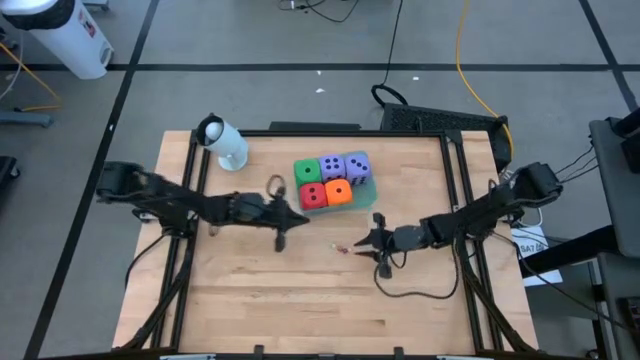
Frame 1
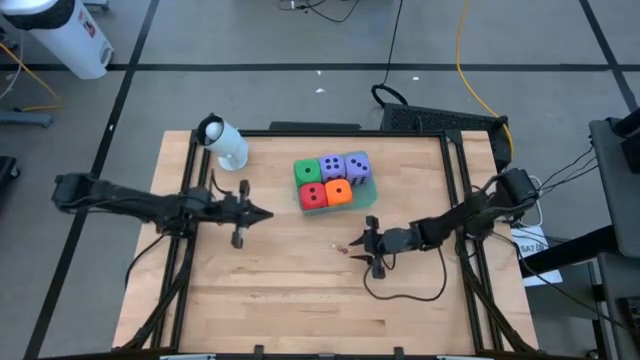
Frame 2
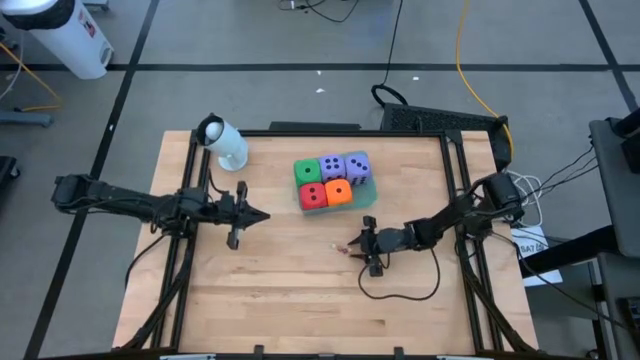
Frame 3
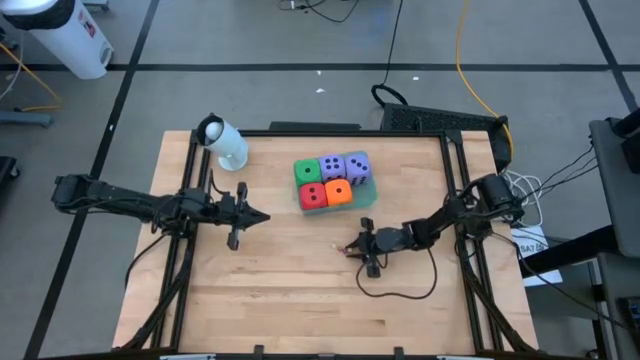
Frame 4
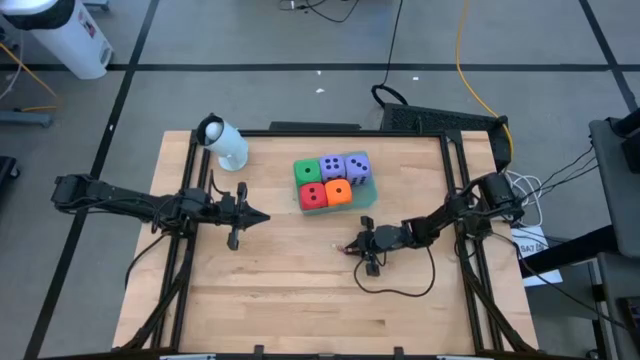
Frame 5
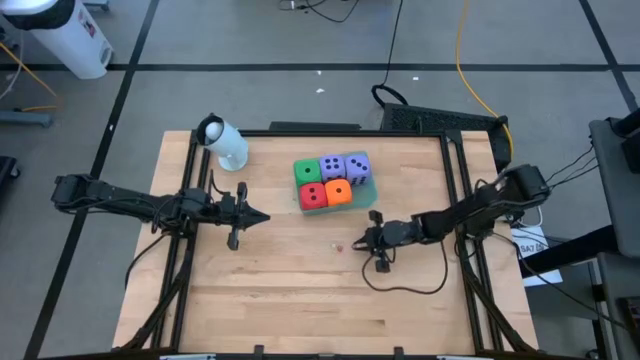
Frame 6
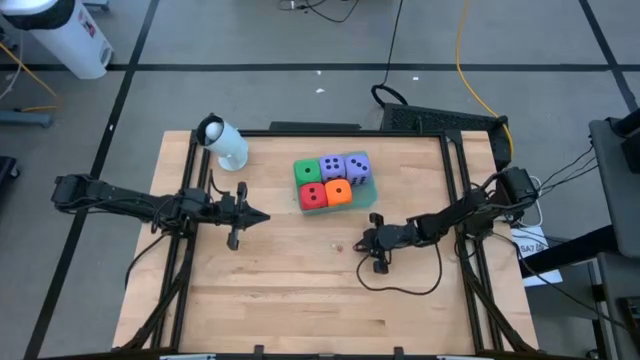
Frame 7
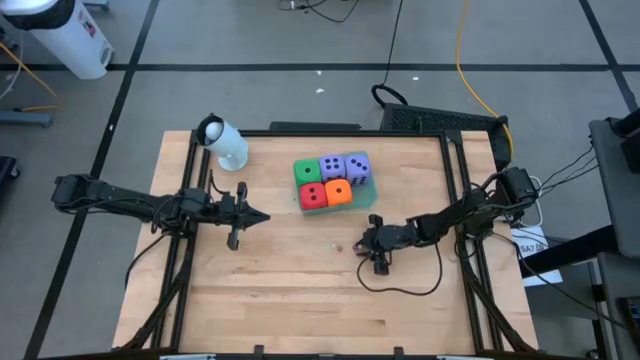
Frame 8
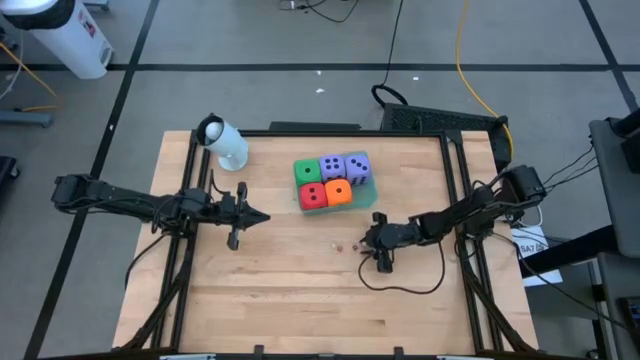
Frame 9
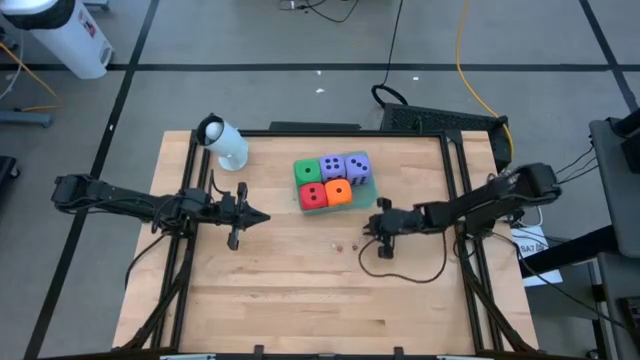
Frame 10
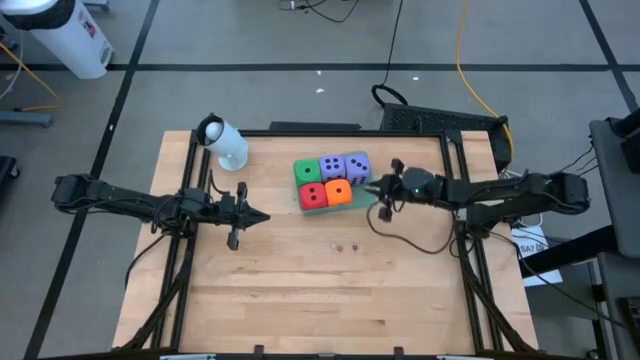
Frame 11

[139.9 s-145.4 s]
Task: Pick & Place Dice
Put the small yellow dice into the blue bin

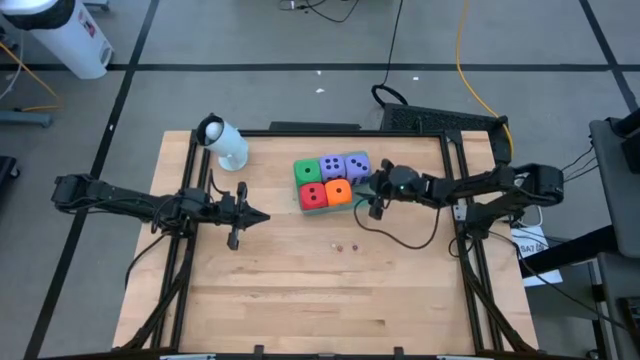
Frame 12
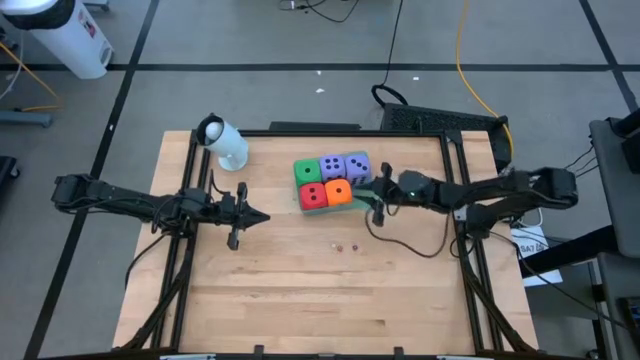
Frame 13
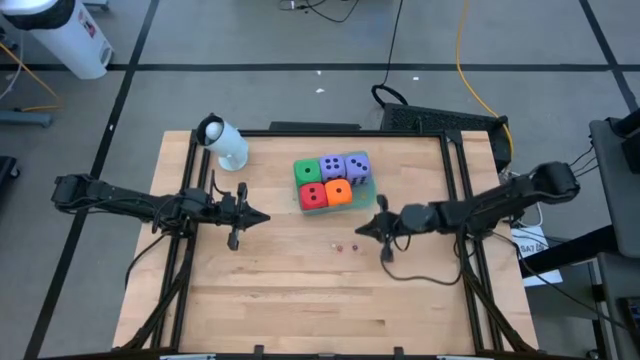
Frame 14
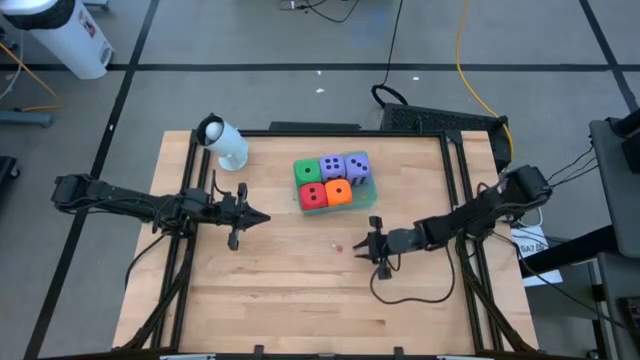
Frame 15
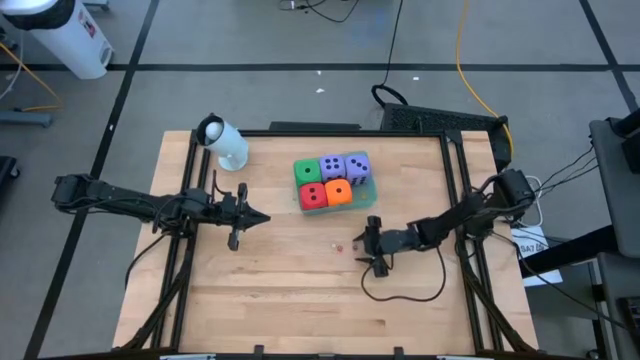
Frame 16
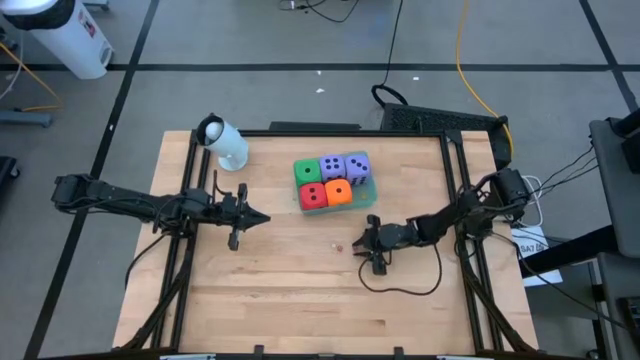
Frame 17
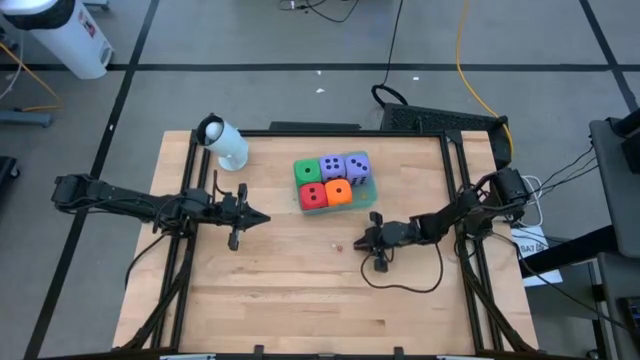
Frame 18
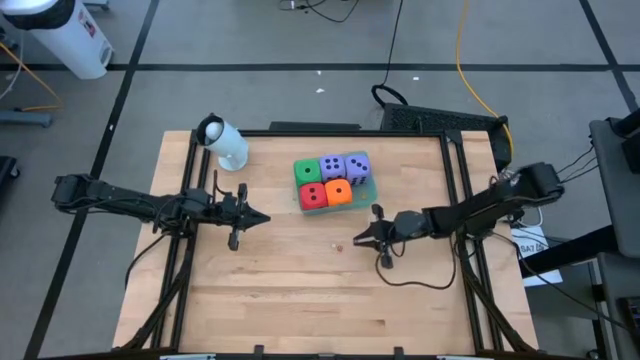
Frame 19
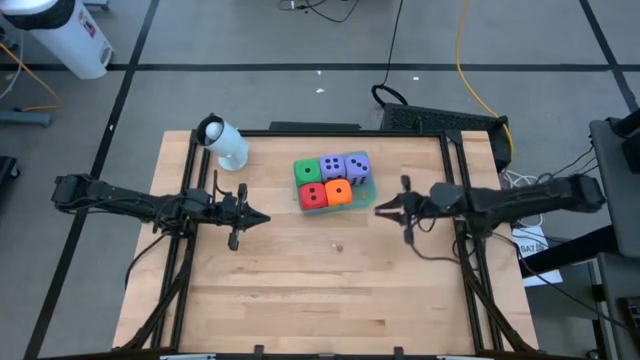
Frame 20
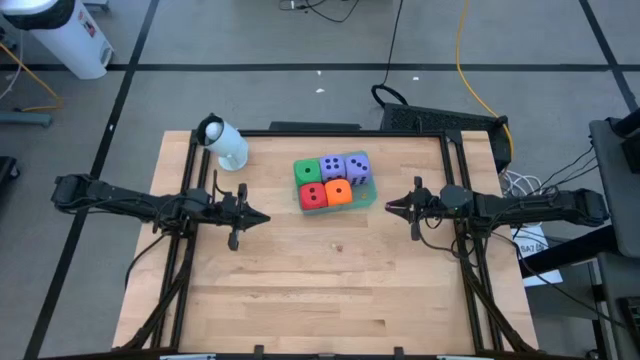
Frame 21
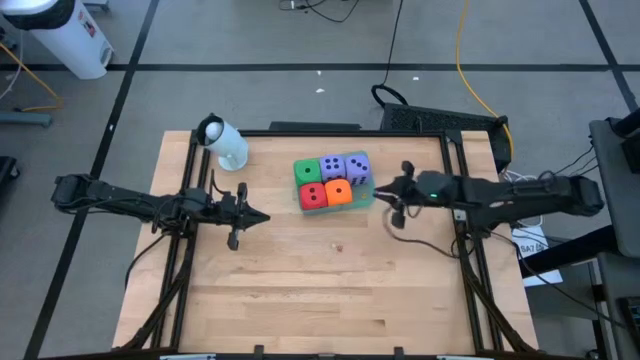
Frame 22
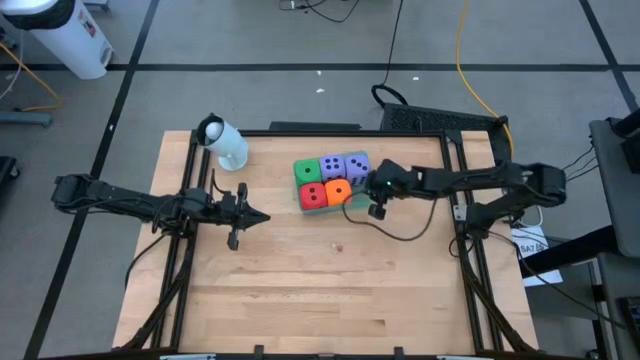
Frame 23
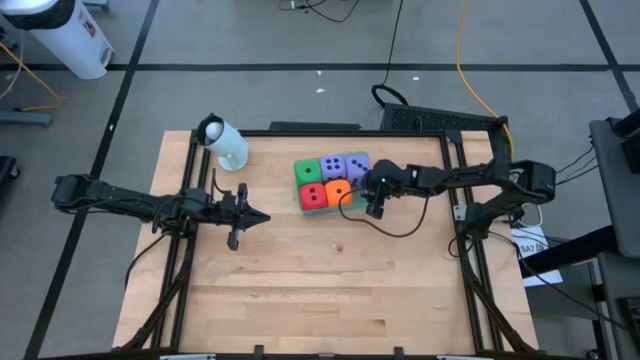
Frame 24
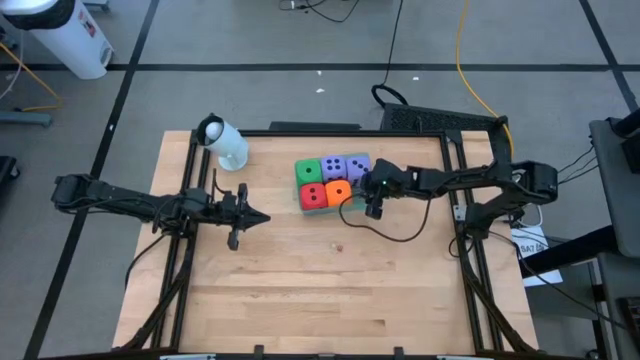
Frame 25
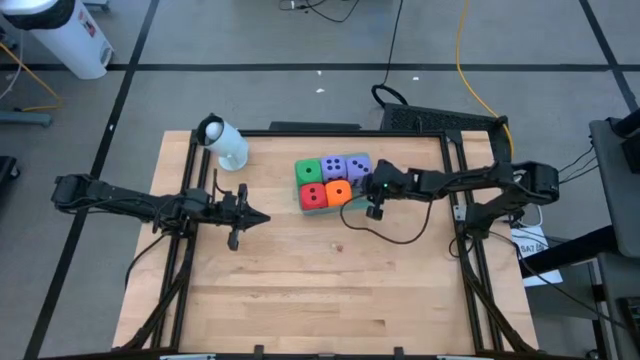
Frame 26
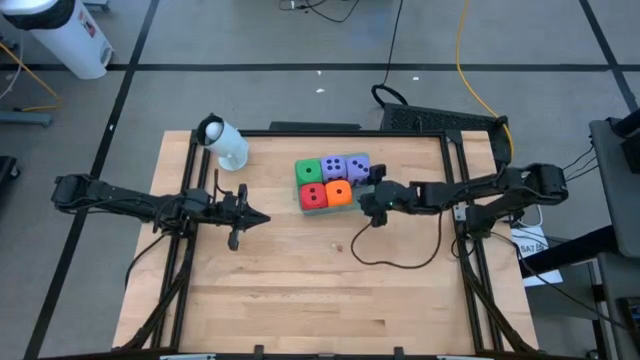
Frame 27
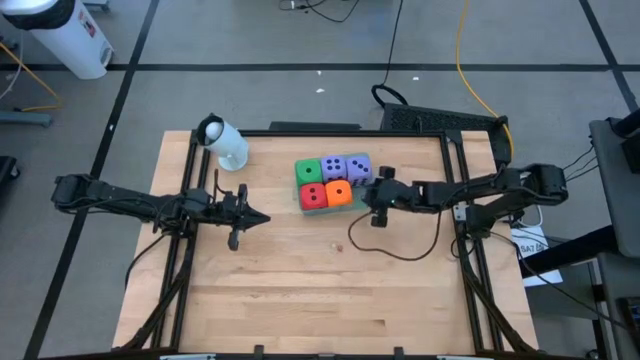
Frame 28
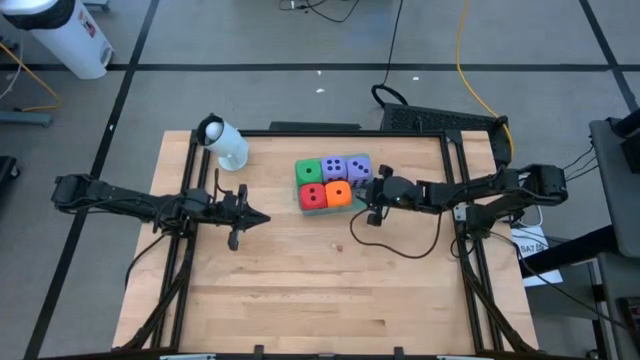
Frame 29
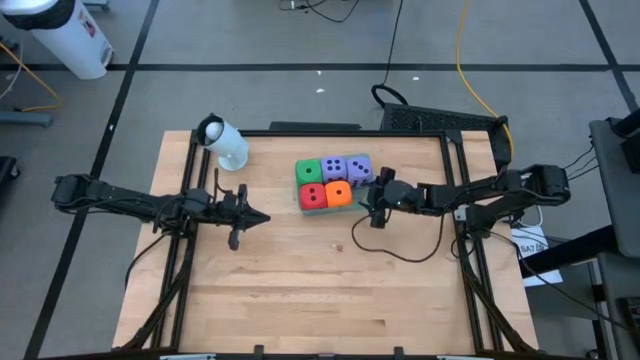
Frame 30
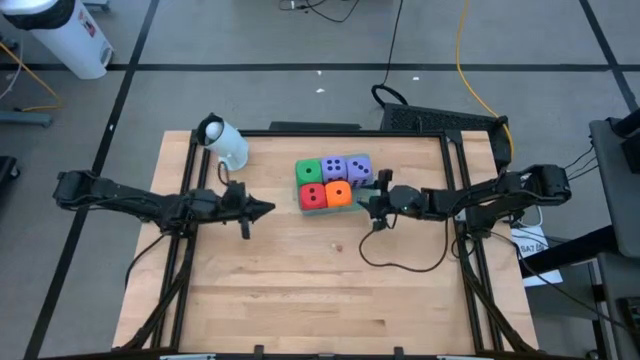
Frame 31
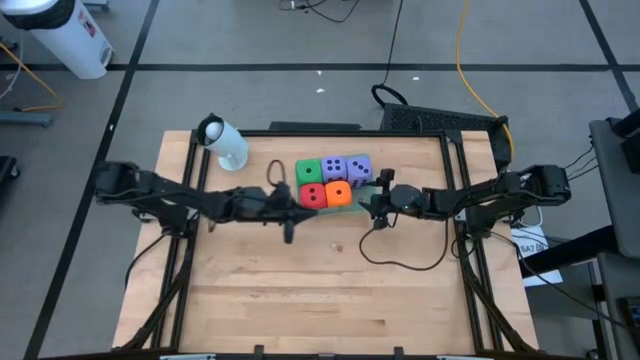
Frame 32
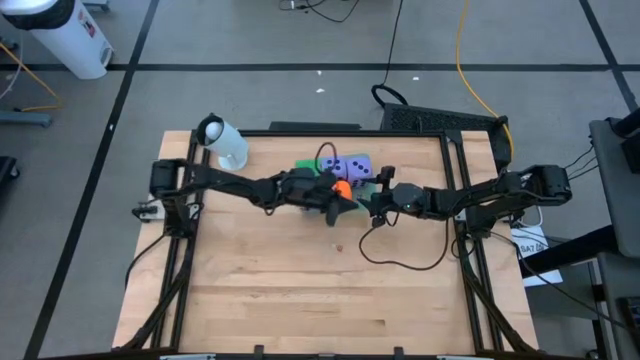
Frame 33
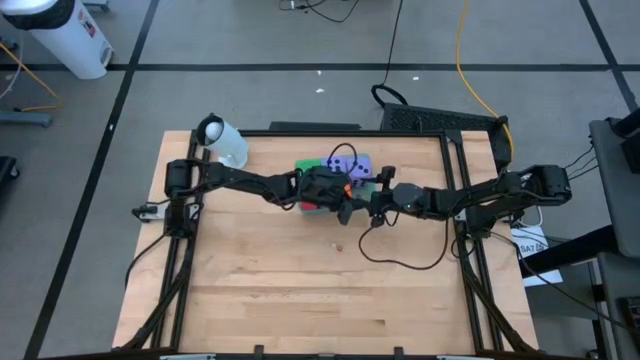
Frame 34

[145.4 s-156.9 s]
Put the small purple dice into the blue bin

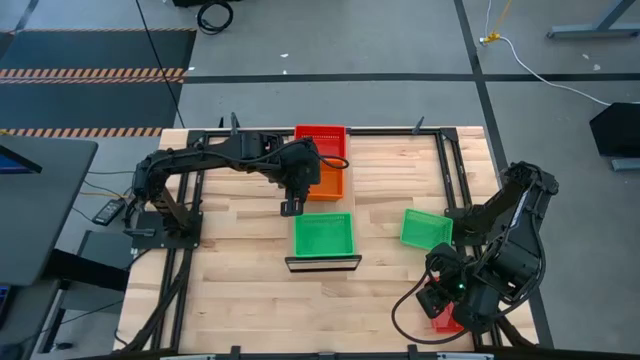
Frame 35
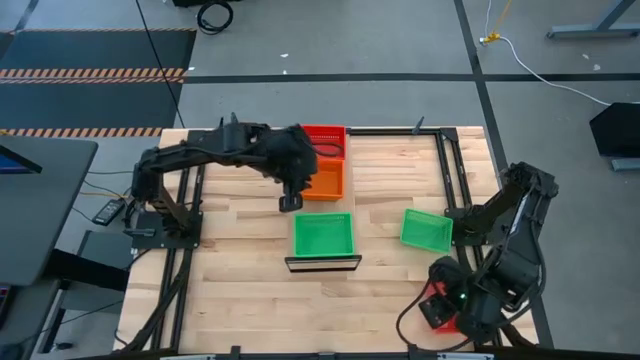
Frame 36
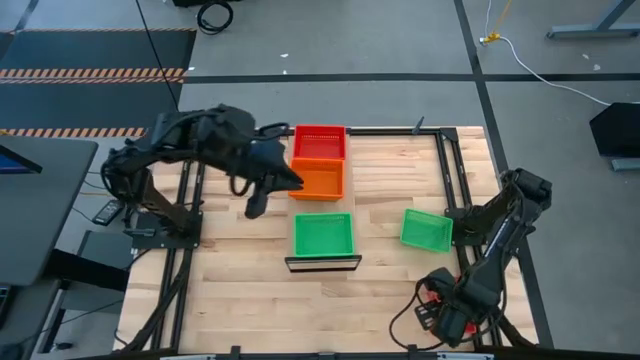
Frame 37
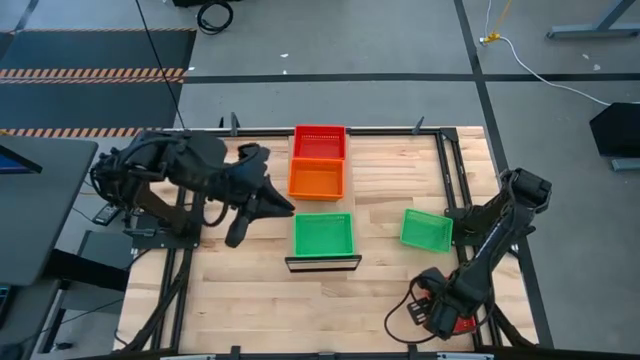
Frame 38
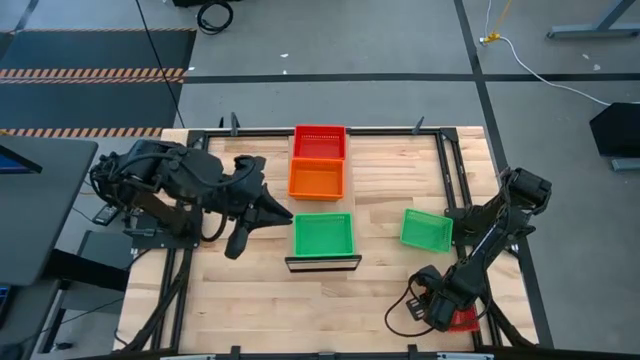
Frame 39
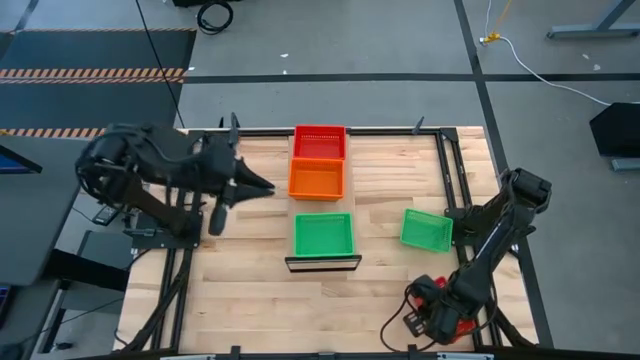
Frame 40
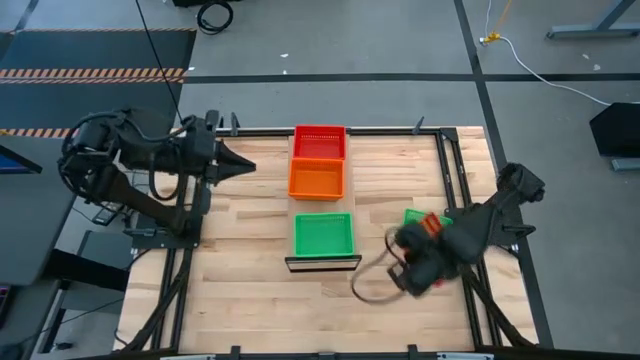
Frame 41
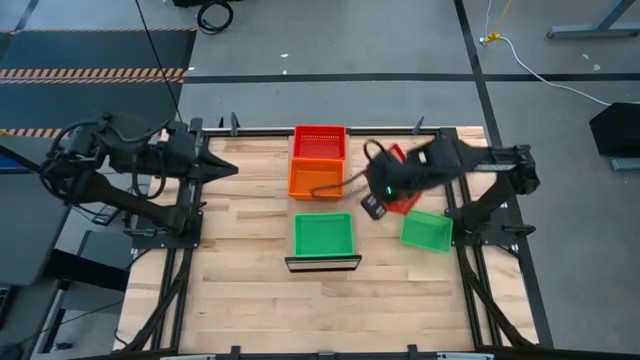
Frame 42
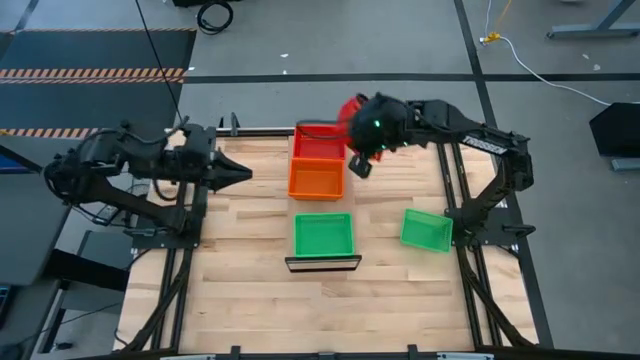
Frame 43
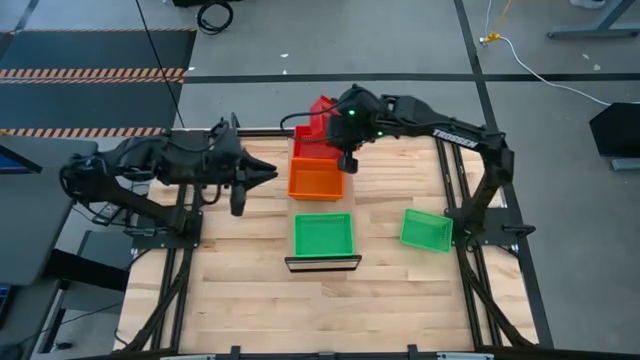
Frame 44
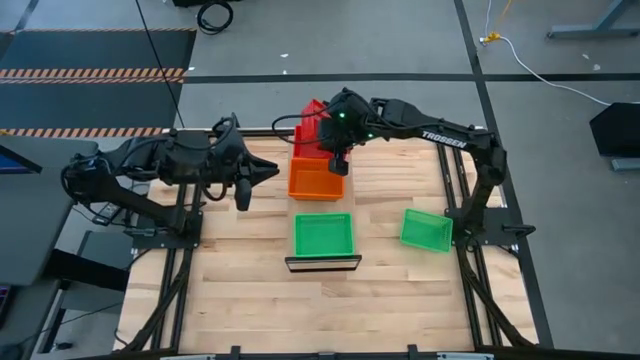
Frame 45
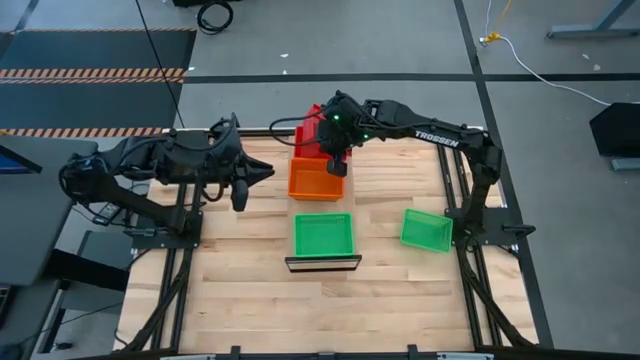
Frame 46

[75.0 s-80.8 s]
Task: Stack baskets on shelf by color
Stack the red basket on top of the red baskets on the shelf
